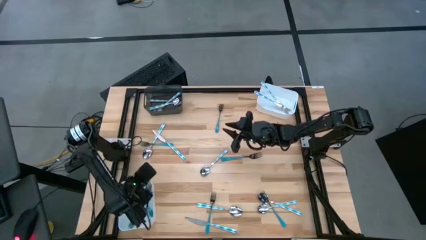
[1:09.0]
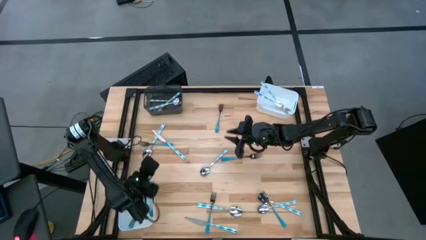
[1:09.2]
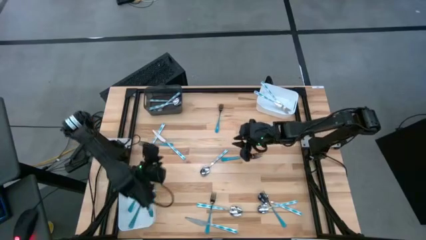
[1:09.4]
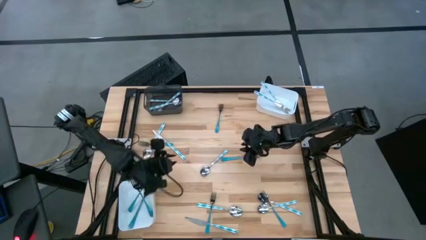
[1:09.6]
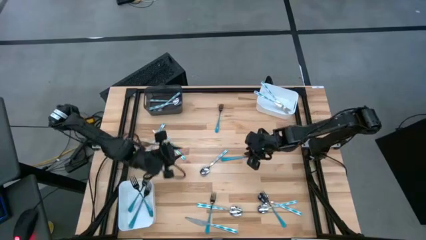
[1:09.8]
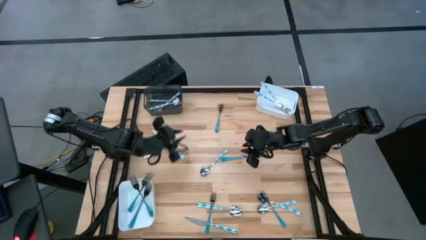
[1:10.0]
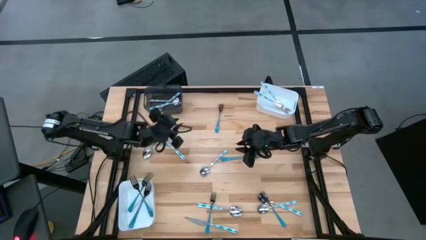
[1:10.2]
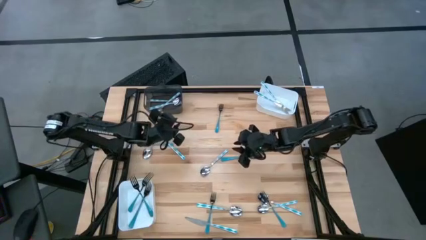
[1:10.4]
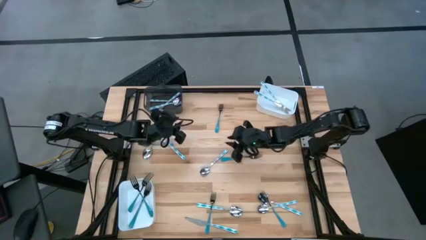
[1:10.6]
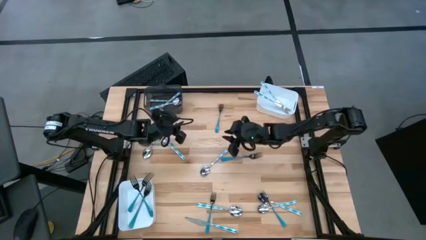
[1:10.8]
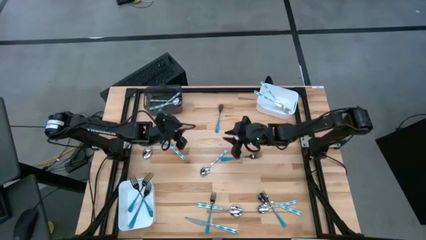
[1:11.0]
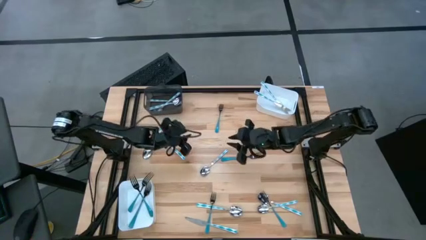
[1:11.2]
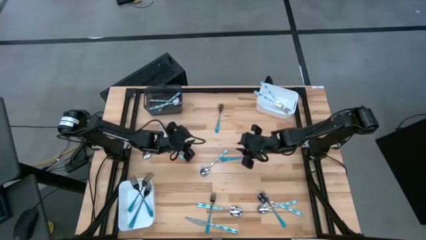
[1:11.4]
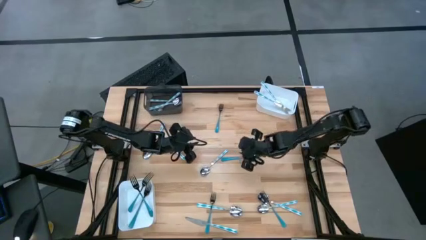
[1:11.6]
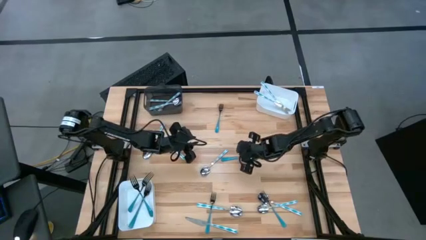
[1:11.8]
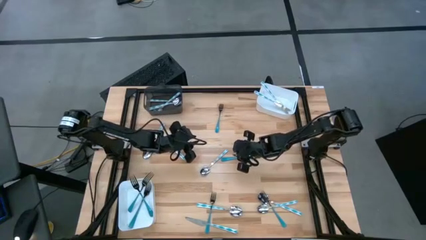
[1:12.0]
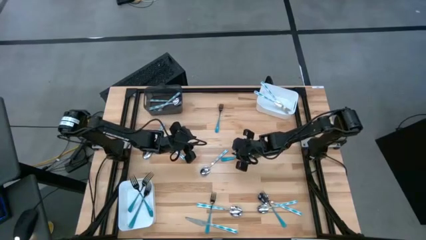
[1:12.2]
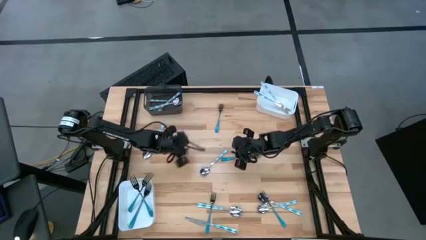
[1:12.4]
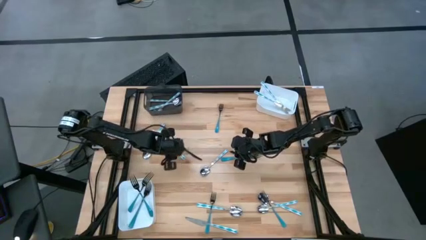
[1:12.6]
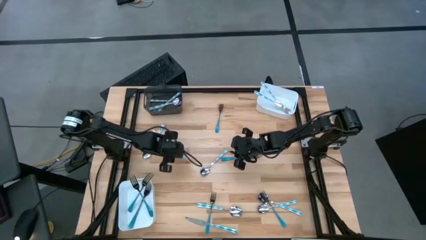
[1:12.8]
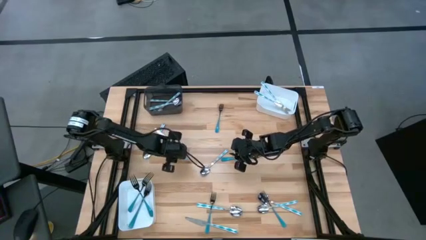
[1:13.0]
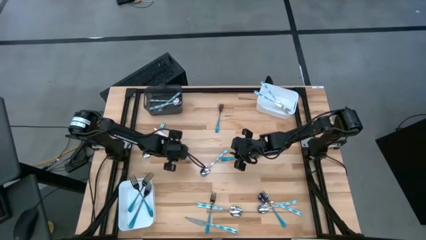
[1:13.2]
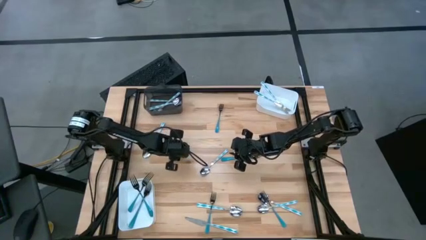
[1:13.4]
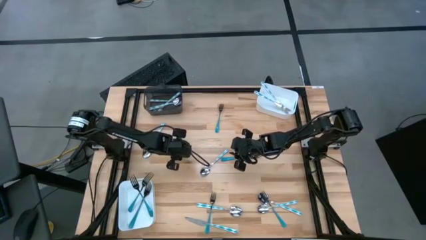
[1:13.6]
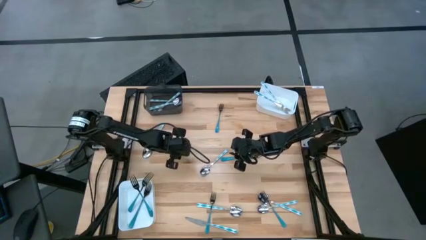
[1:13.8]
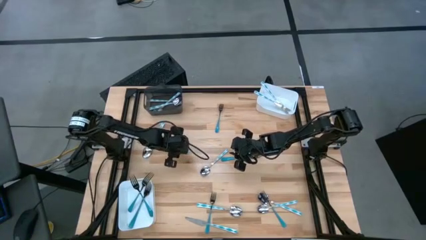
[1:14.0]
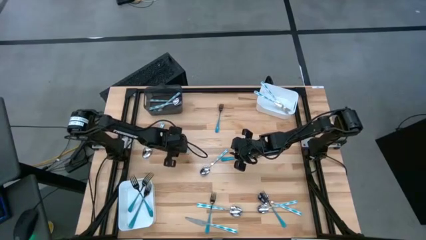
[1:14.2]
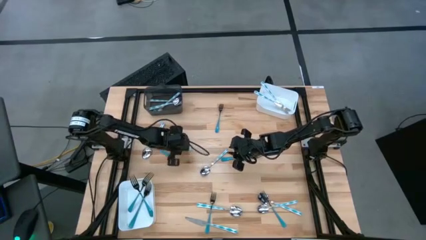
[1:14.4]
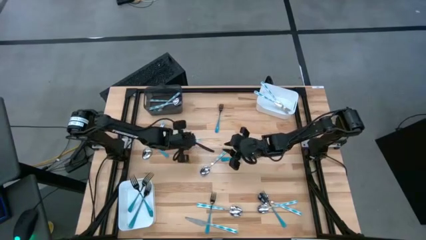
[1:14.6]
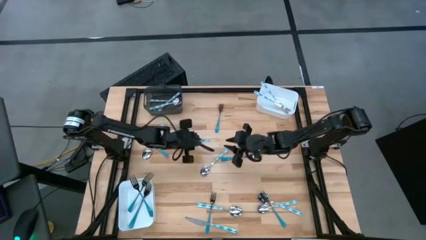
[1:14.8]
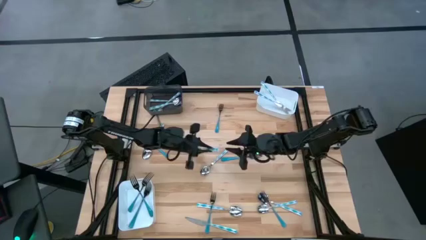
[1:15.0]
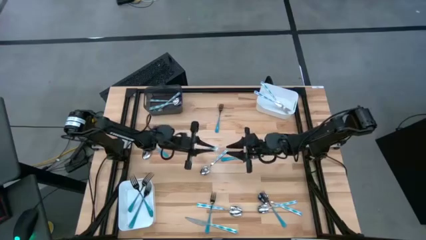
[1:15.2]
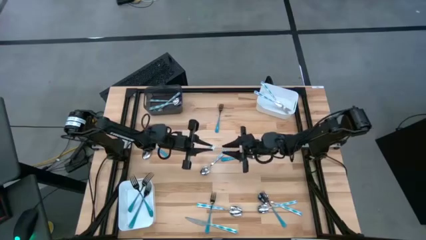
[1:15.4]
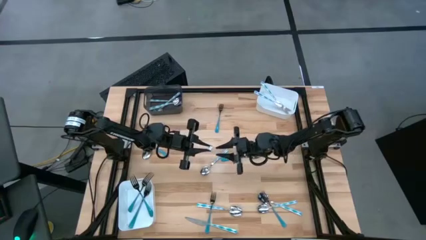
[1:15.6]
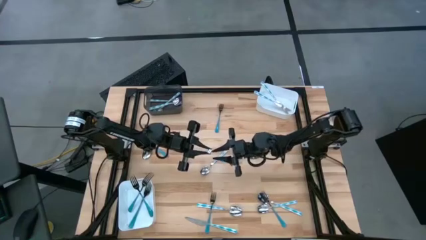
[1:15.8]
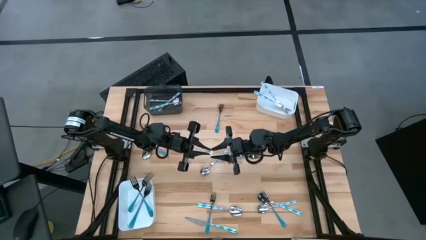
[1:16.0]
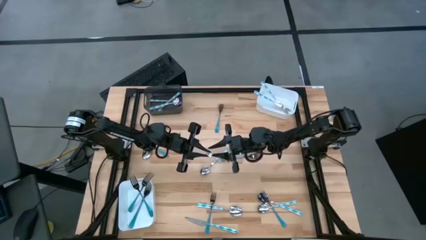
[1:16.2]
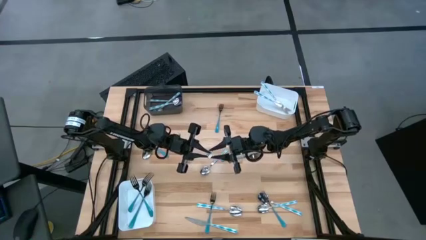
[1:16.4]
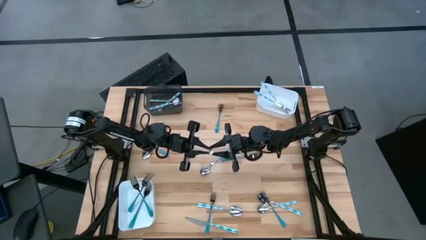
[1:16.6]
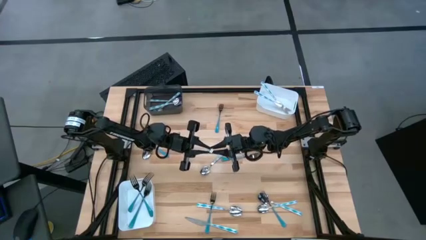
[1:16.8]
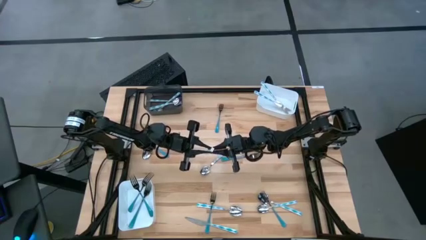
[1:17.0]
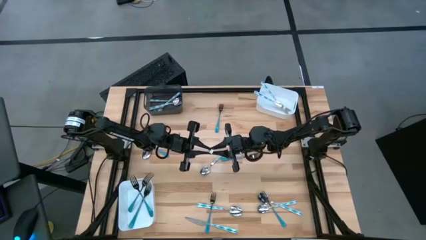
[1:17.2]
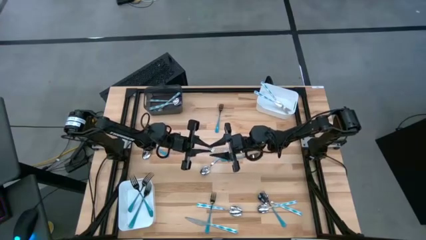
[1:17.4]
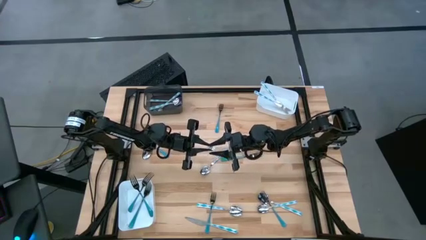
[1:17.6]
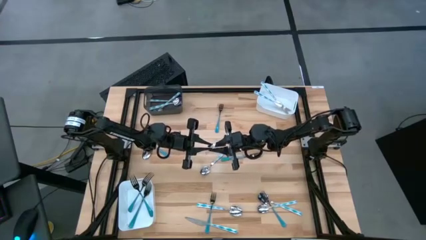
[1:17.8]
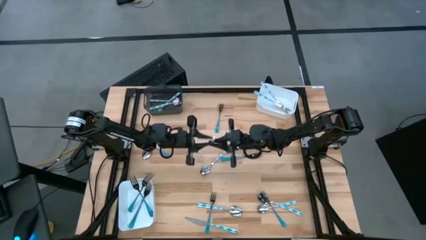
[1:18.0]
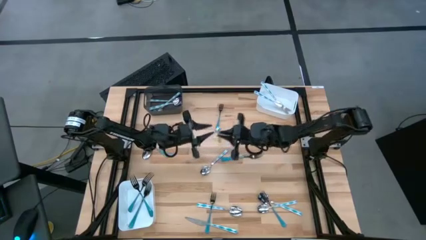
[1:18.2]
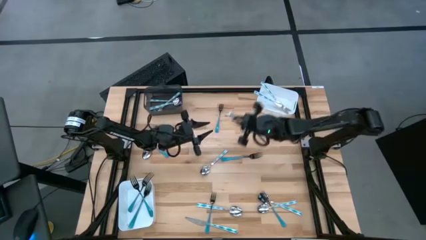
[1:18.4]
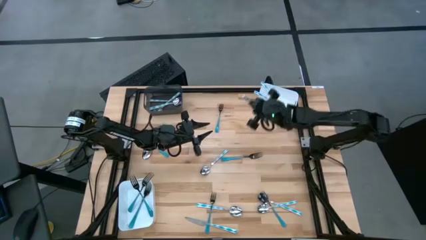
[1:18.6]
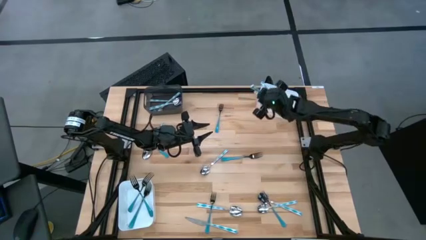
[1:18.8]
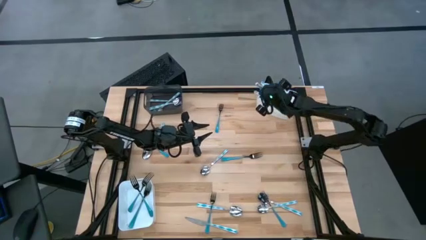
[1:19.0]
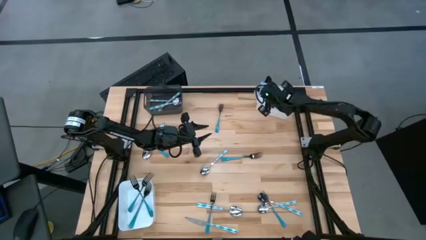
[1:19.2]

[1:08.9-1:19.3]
Task: Sort silverware by color (type)
Put the blue patterned table knife into the top white bin

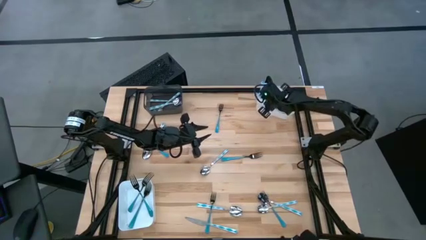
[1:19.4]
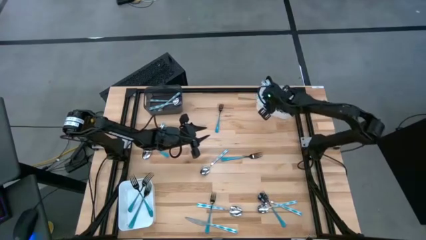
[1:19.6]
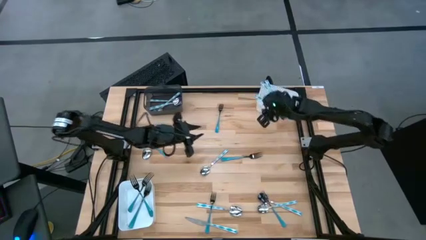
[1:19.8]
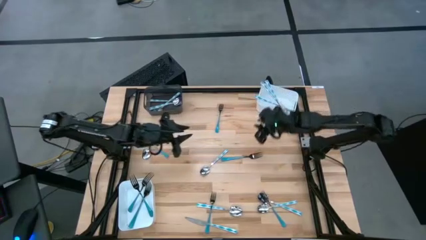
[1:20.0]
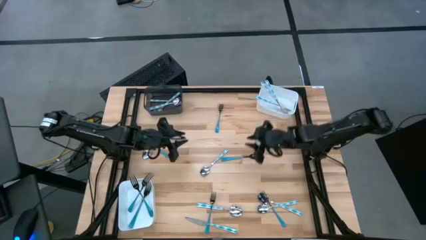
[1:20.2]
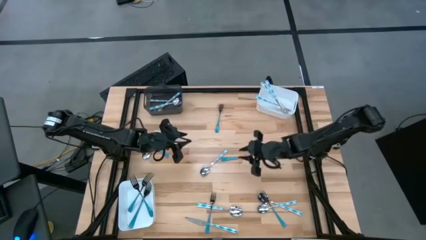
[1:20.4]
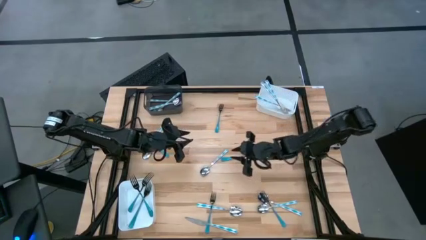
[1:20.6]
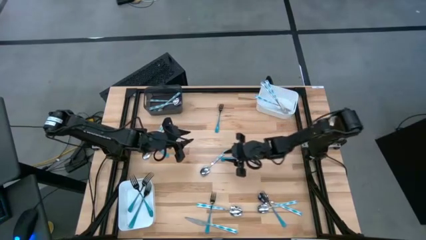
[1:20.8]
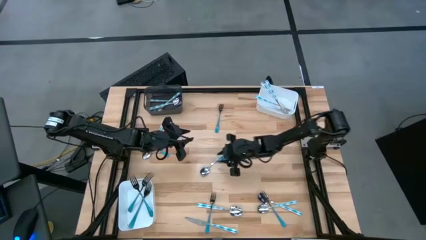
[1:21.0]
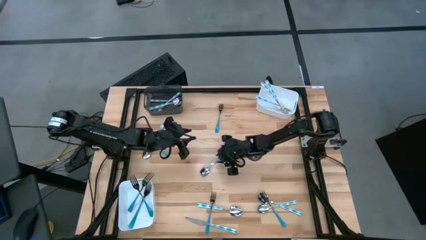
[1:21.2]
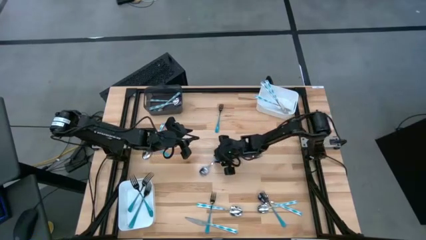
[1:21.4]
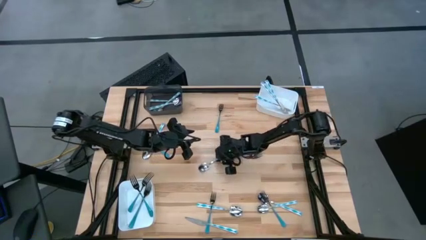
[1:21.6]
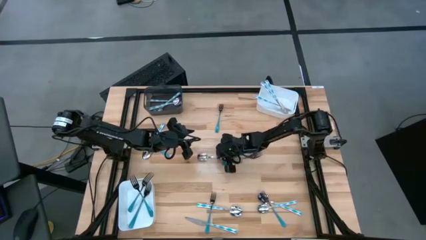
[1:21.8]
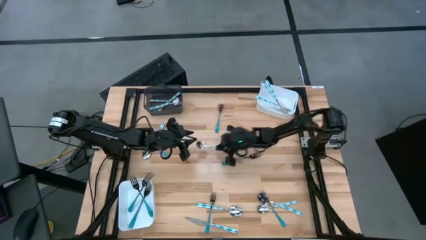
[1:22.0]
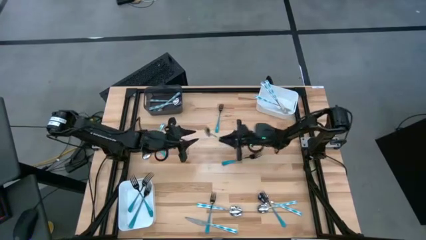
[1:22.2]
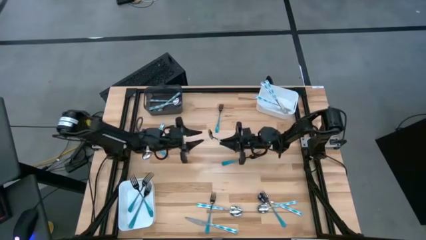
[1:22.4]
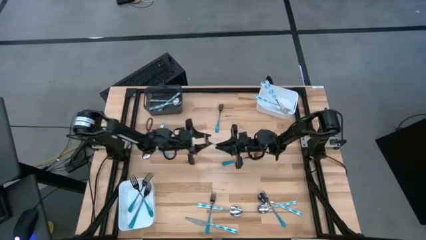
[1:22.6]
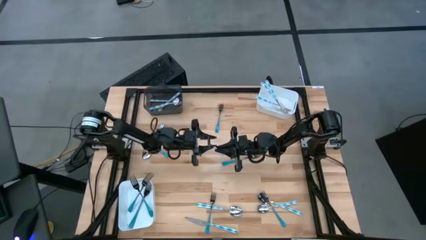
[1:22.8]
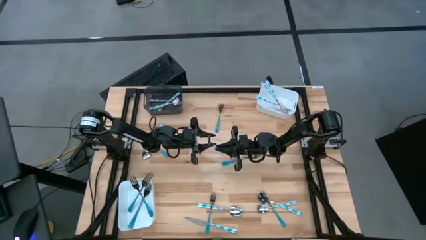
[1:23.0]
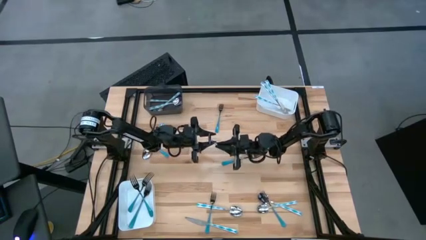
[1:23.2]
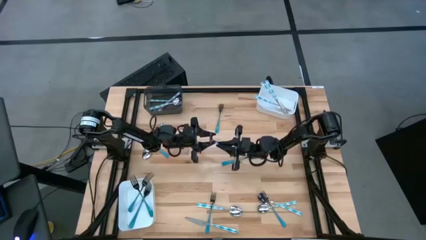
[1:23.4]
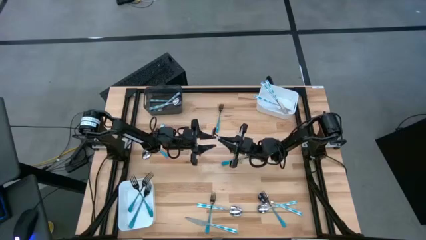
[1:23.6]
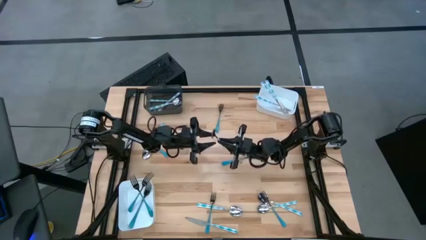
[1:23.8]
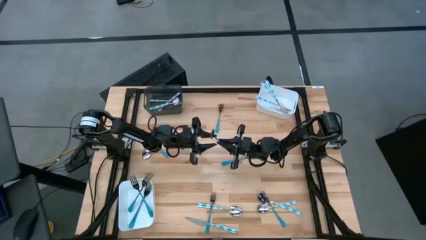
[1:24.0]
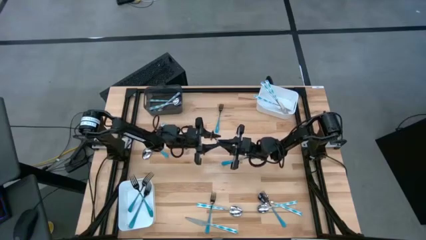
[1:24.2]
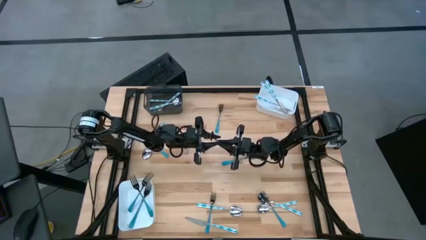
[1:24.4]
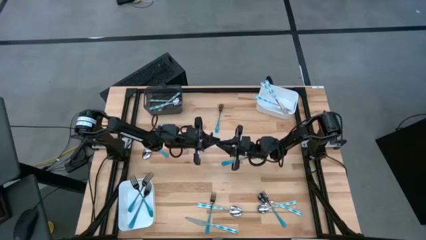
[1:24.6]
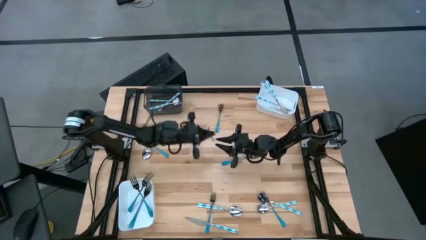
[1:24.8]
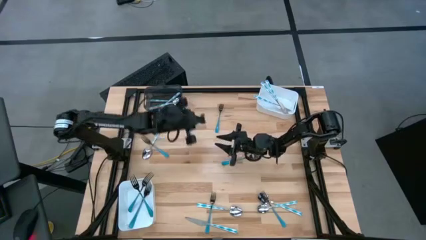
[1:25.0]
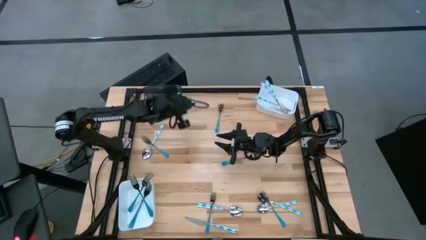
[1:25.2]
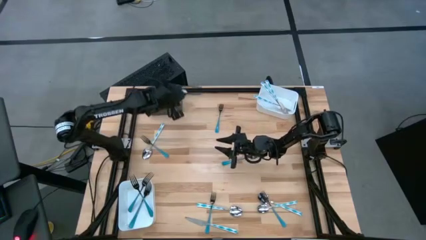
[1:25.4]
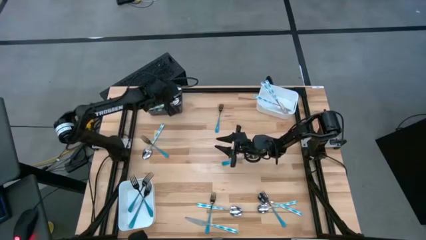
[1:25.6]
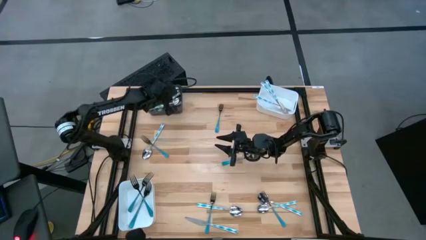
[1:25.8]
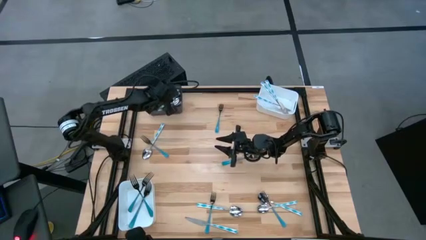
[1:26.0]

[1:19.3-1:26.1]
Put the blue patterned spoon into the black bin
